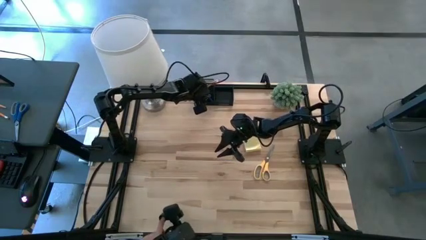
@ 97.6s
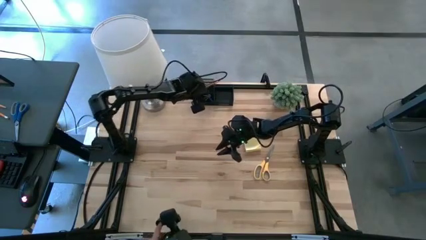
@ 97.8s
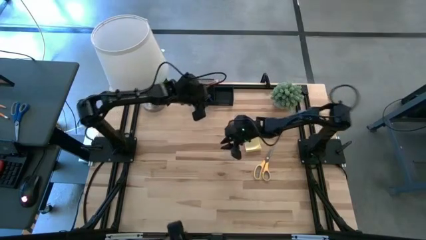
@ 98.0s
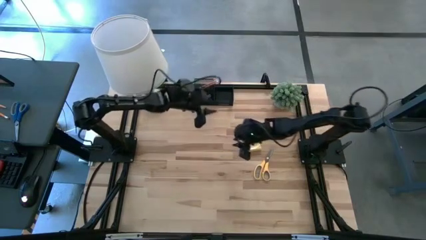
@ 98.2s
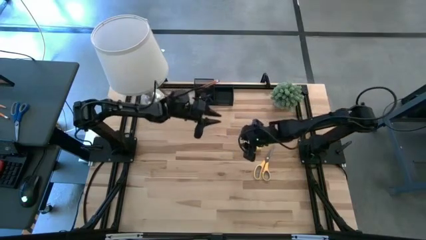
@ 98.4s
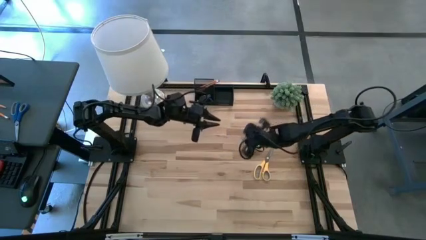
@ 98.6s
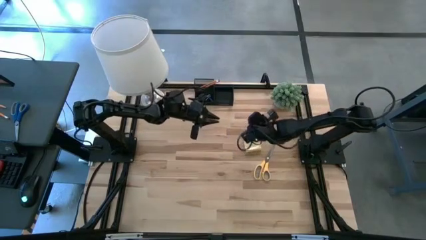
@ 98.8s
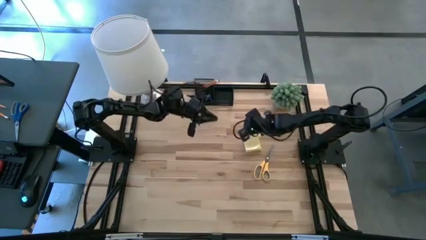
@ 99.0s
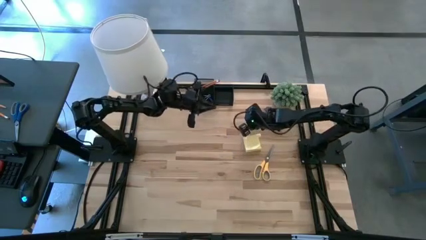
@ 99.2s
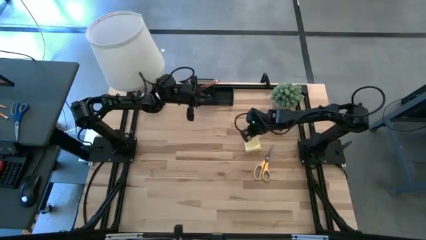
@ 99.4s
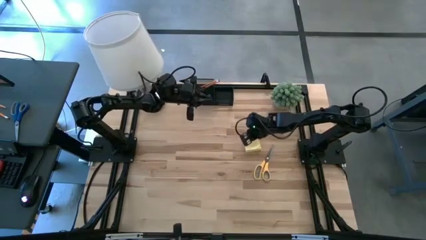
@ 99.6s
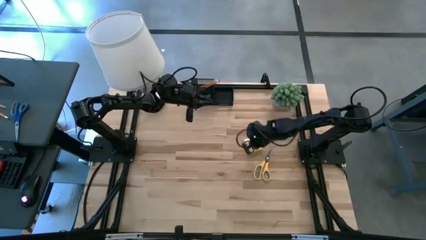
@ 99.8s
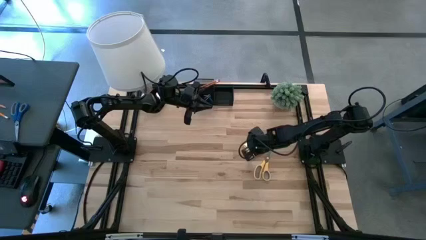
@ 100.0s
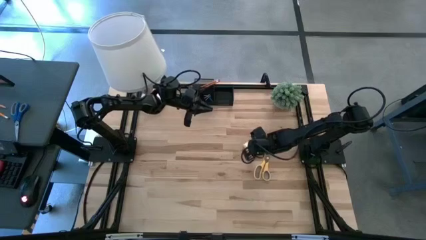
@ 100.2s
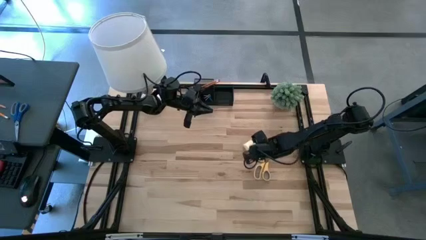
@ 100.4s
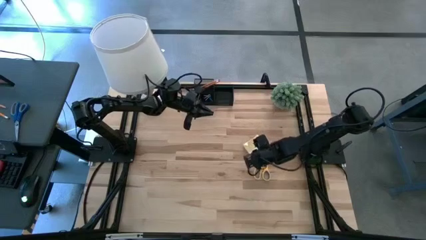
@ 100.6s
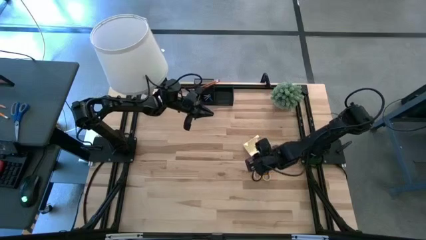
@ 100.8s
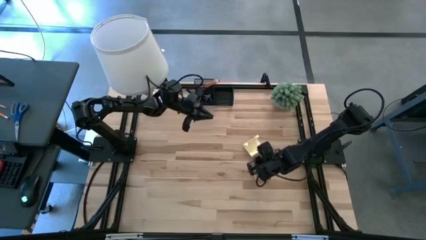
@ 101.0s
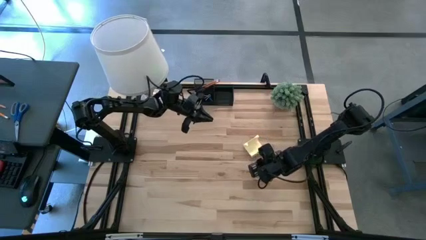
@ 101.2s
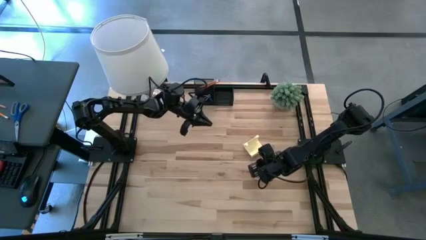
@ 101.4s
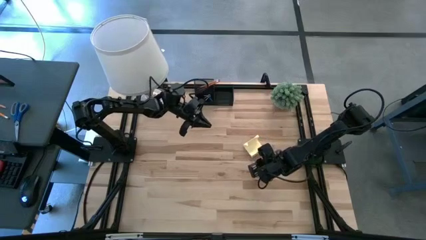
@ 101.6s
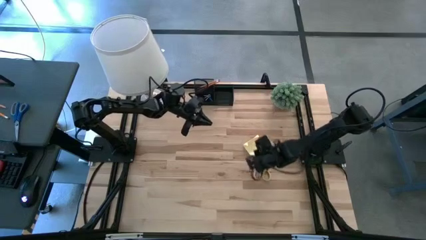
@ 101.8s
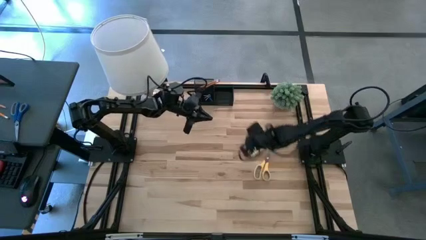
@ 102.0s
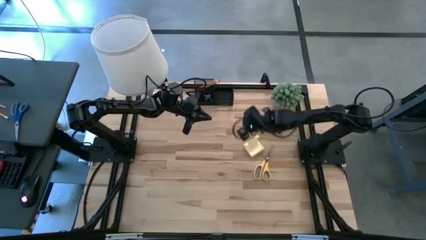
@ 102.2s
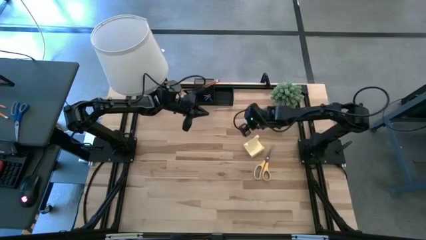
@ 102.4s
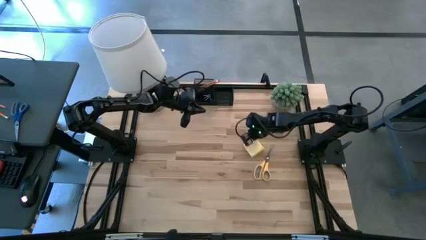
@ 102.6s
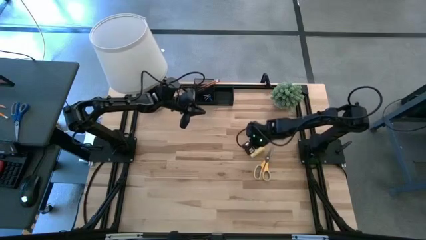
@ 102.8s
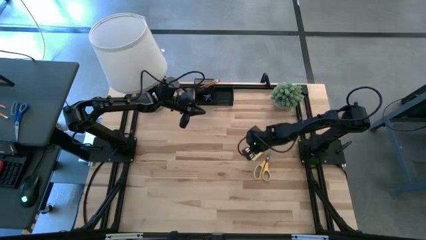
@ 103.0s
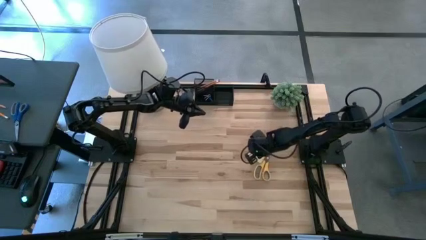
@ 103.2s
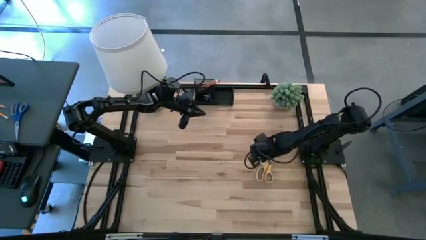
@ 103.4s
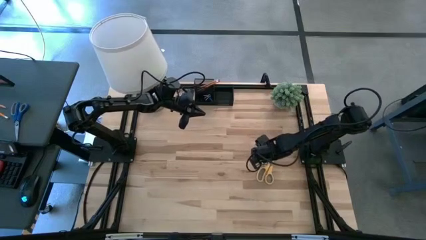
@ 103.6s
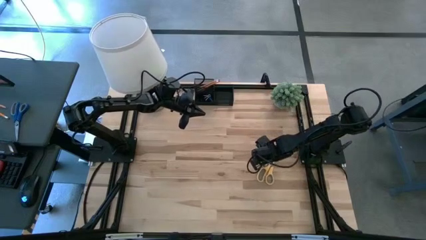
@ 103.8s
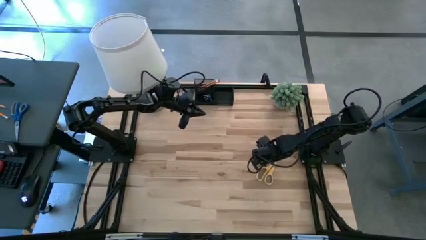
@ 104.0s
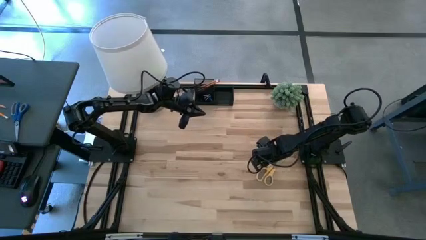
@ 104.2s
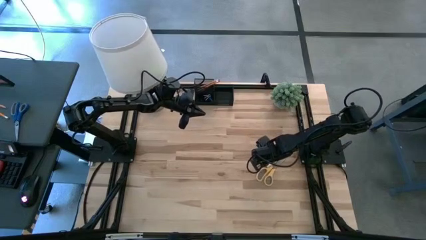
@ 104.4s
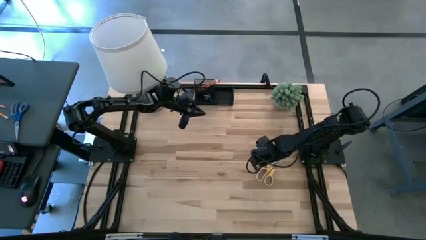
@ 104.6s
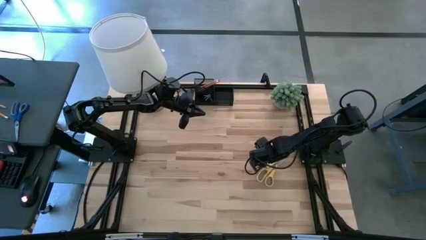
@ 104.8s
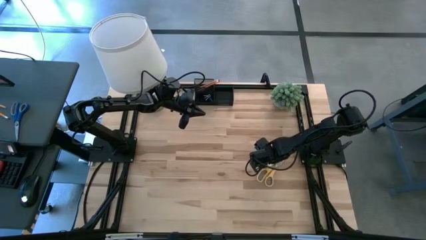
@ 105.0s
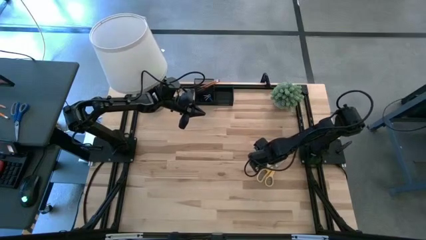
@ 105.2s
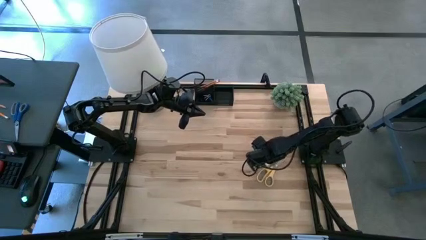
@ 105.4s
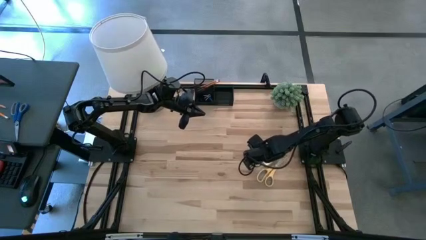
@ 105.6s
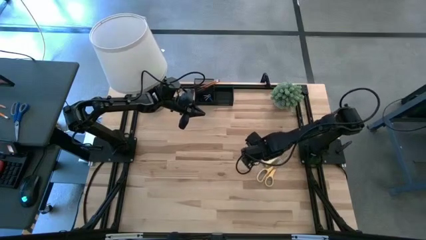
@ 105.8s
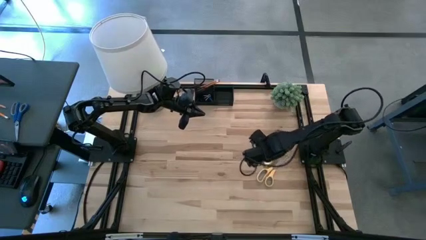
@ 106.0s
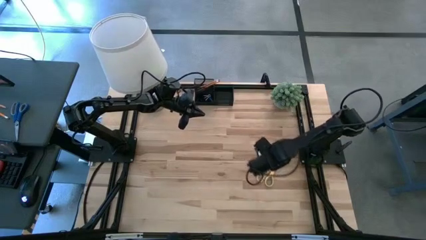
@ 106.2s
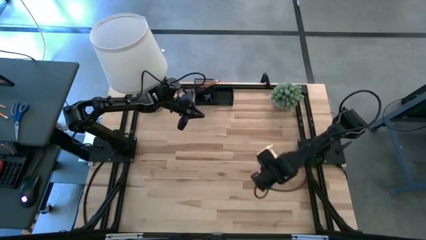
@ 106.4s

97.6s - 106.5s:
Task: Pick and place office supplies into organizer
Put the yellow scissors into the black desk organizer

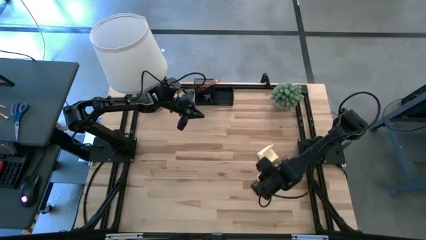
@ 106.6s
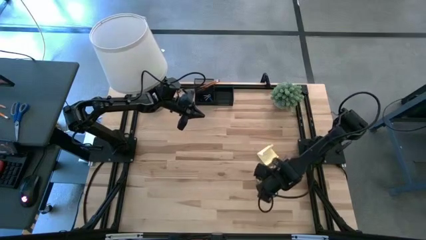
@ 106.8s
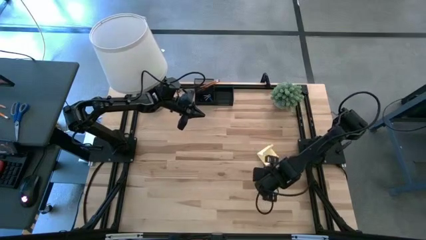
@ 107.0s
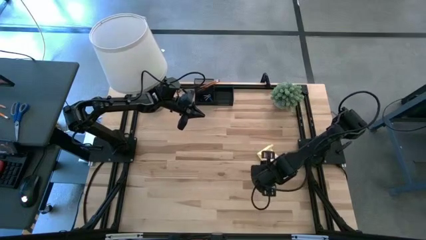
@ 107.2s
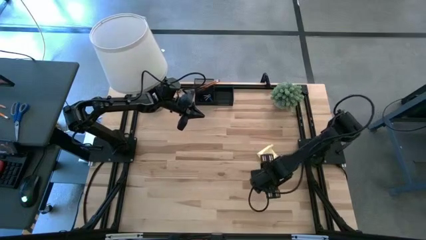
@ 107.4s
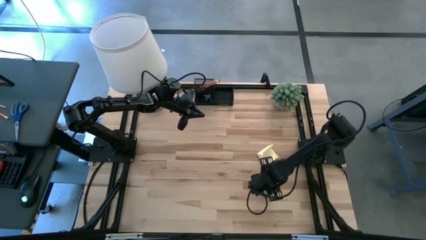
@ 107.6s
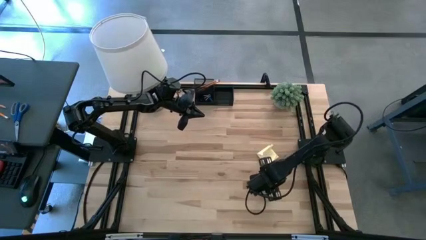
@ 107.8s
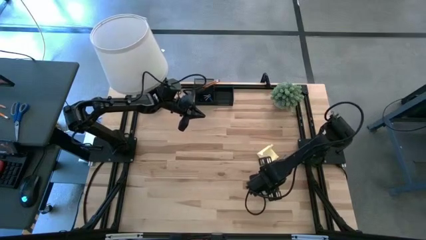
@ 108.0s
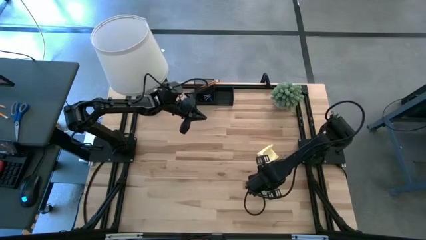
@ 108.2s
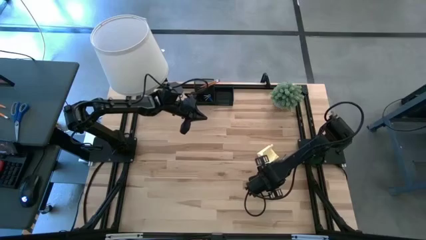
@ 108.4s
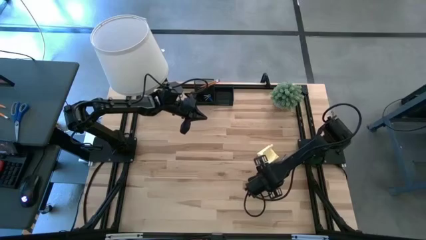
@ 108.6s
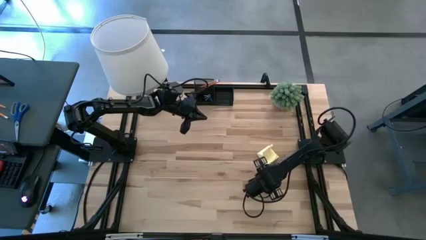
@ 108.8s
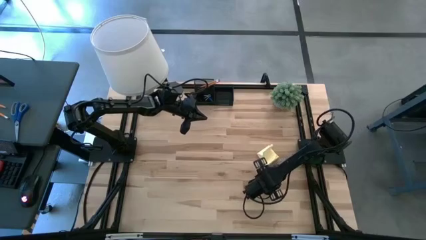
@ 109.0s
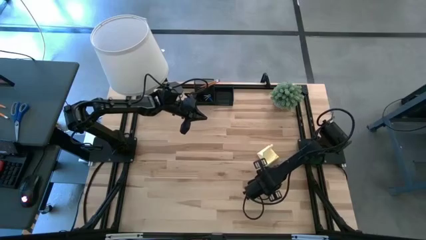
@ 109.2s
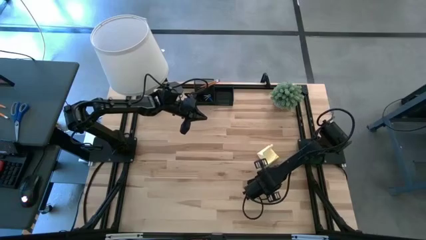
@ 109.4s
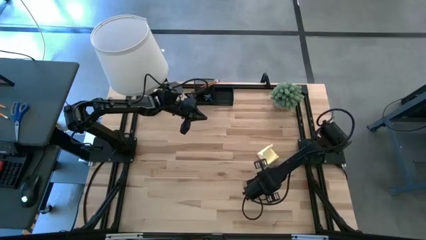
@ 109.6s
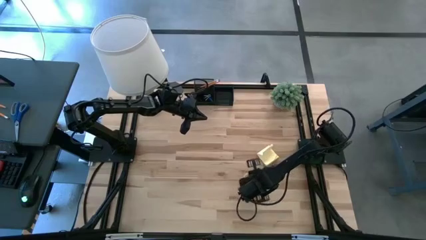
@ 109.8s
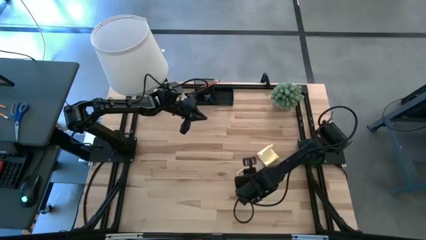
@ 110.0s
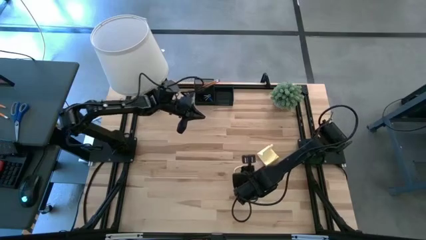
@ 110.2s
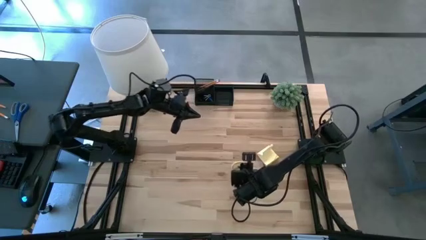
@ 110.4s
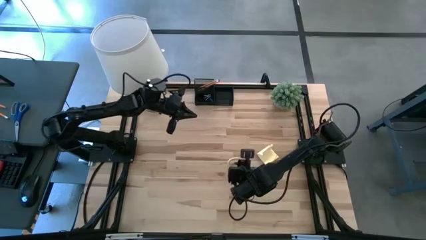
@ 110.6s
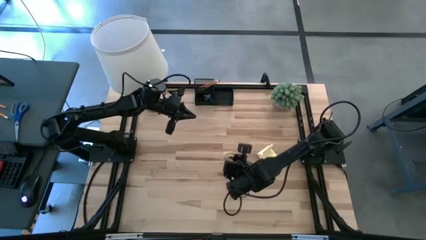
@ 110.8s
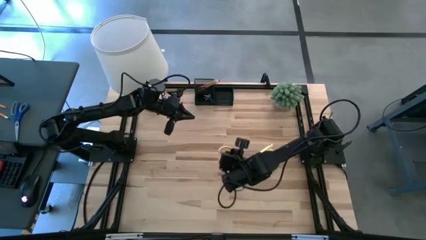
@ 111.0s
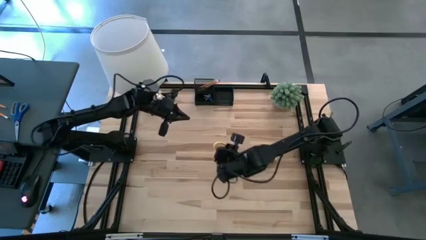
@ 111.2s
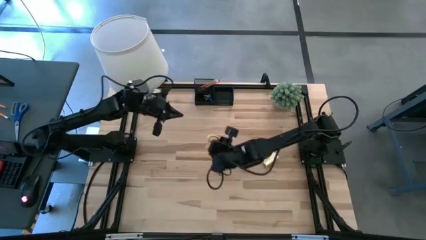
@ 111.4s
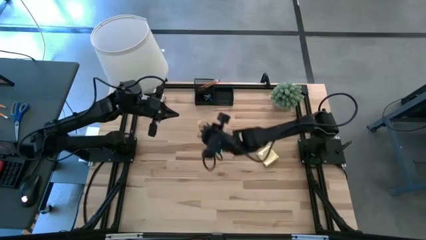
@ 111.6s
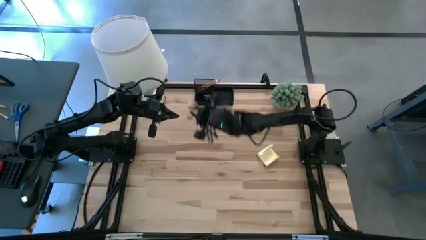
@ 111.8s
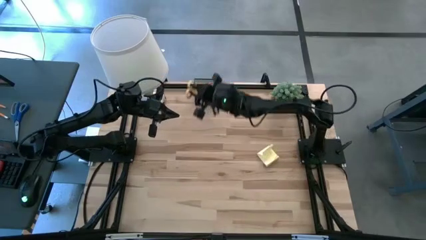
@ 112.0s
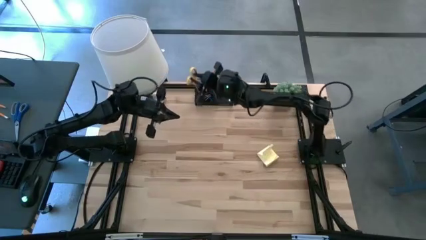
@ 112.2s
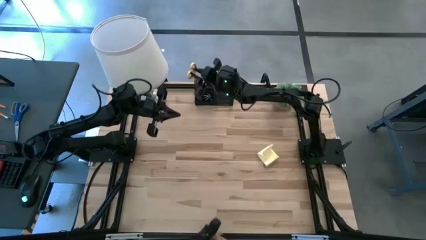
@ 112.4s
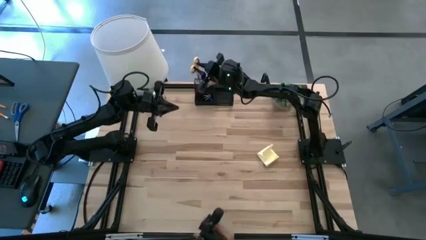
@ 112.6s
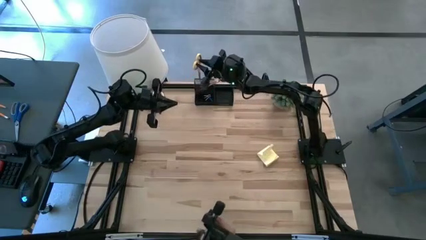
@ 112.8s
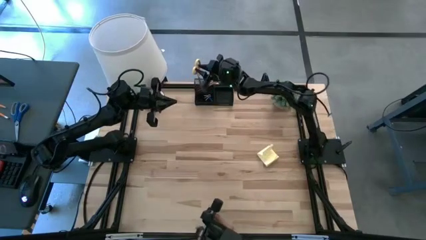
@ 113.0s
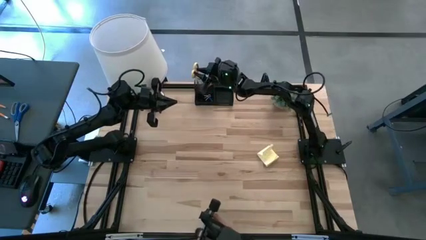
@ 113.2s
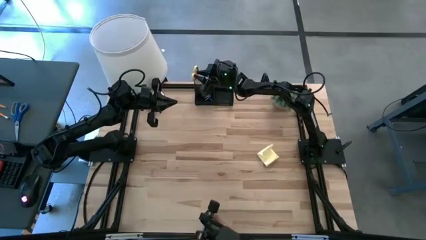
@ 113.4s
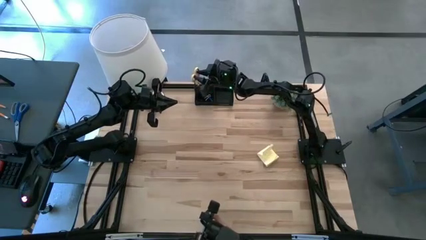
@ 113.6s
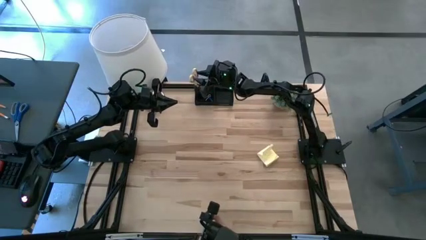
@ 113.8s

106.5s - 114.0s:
Put the yellow scissors into the black desk organizer

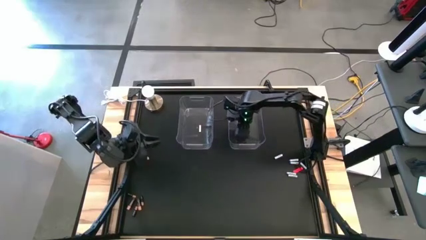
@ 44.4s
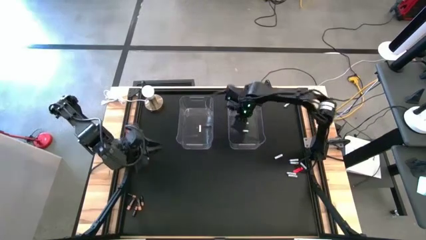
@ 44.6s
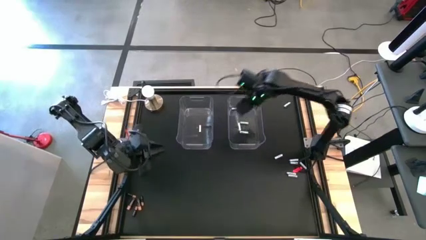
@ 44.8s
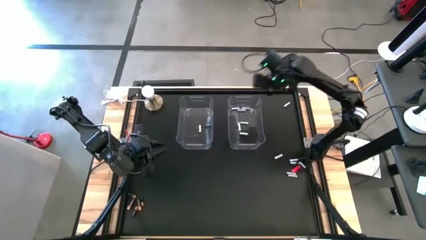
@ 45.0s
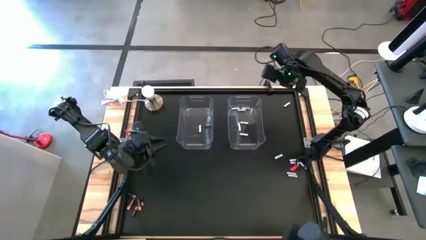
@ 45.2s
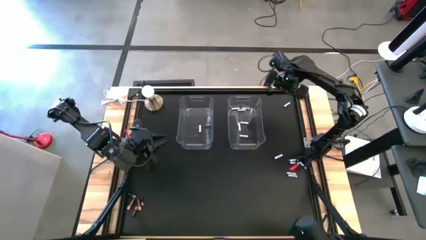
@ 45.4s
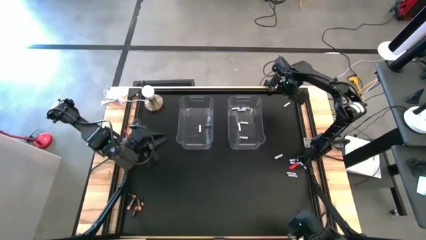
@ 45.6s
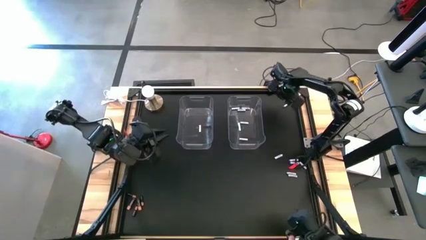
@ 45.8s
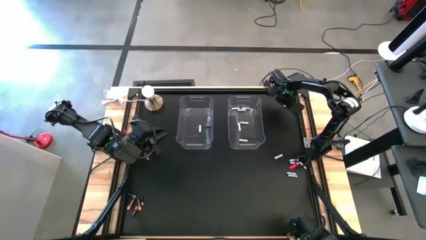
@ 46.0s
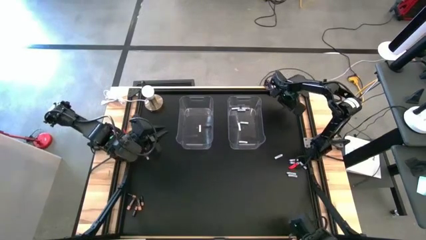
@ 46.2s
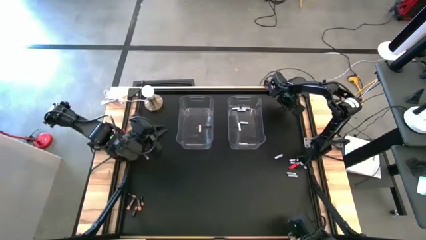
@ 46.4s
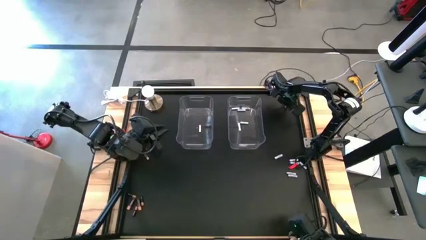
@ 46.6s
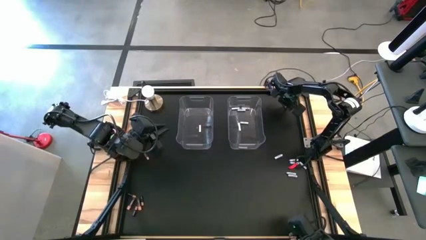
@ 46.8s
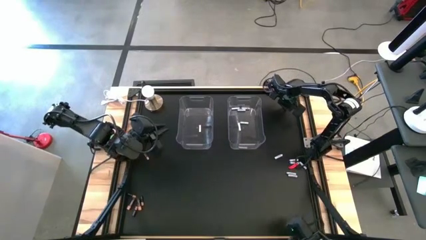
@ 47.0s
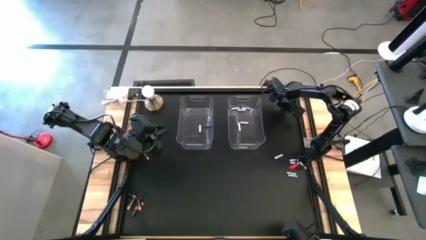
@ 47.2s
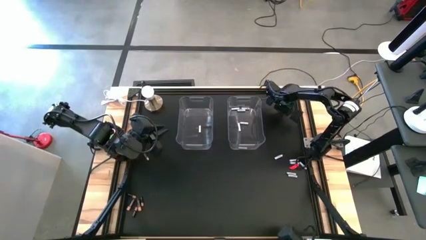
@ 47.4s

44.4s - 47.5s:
Task: Sort batteries
Put the white battery into the right transparent bin
